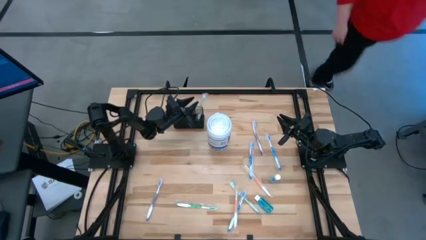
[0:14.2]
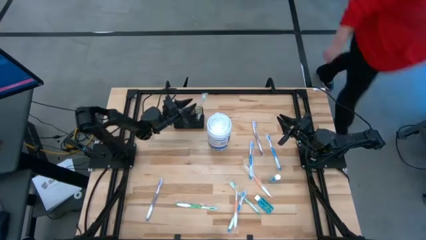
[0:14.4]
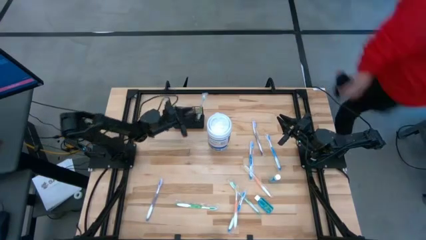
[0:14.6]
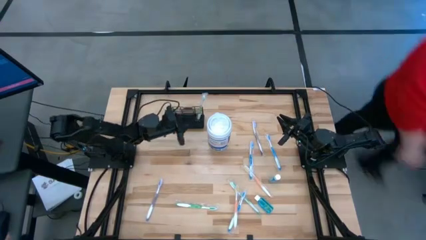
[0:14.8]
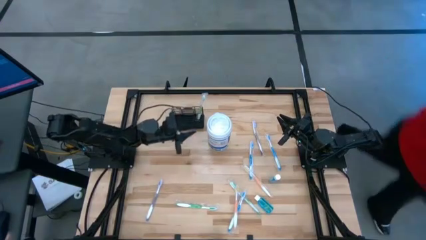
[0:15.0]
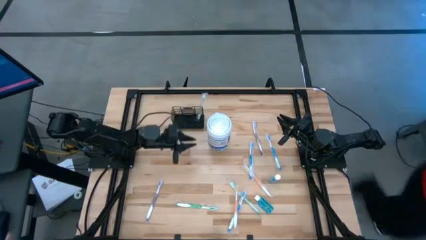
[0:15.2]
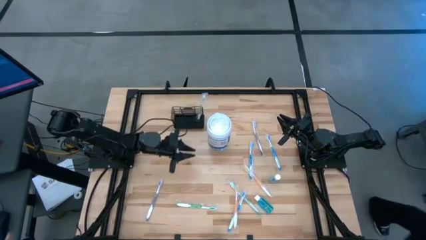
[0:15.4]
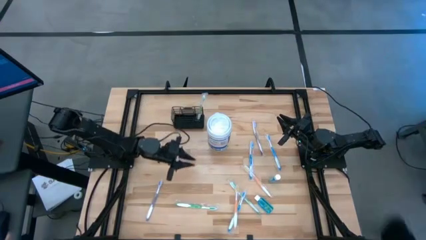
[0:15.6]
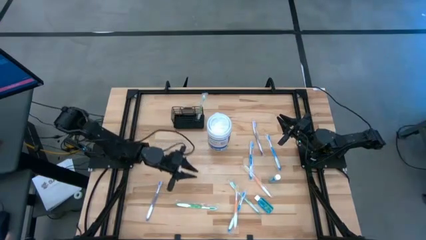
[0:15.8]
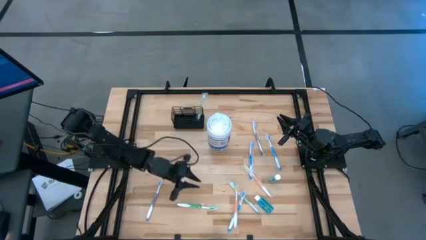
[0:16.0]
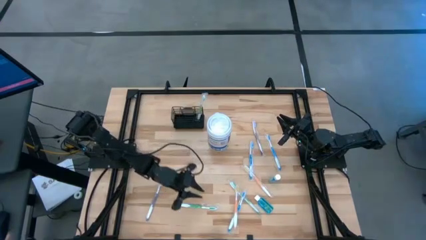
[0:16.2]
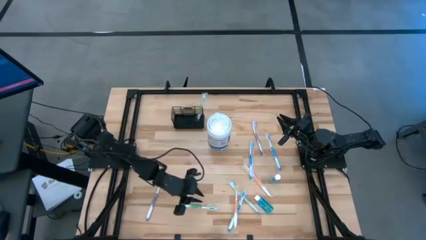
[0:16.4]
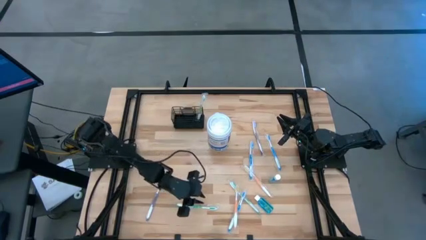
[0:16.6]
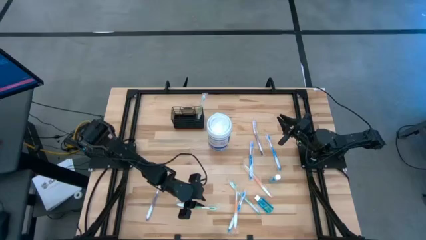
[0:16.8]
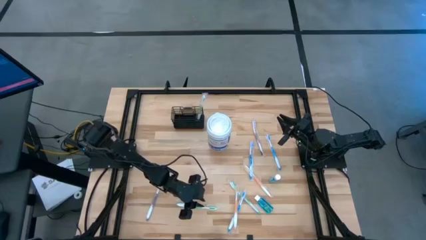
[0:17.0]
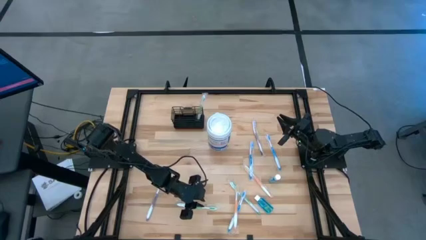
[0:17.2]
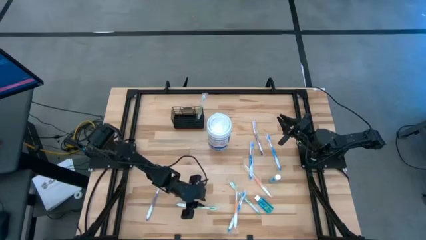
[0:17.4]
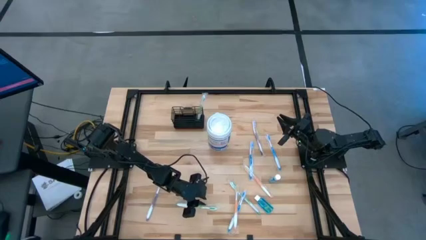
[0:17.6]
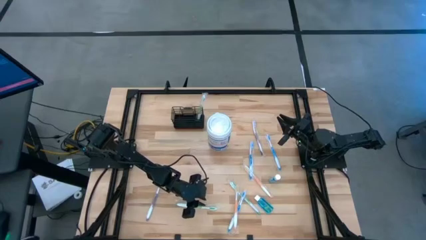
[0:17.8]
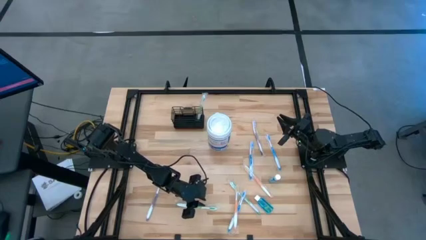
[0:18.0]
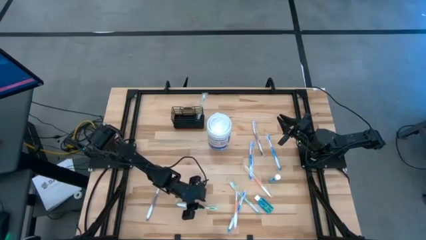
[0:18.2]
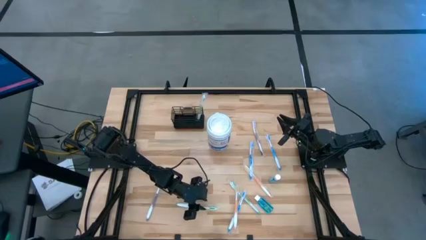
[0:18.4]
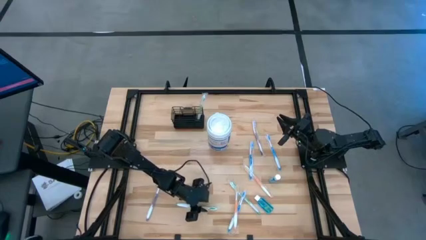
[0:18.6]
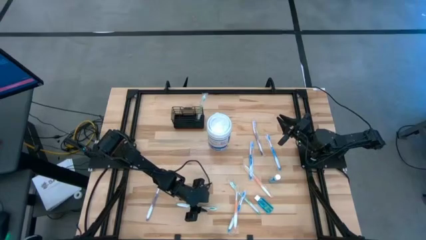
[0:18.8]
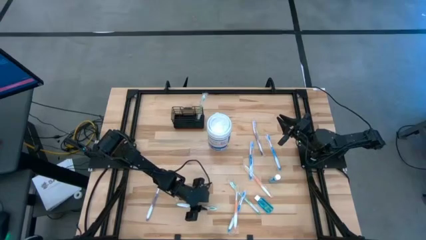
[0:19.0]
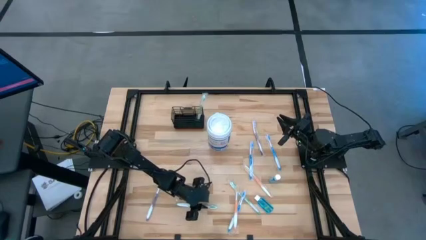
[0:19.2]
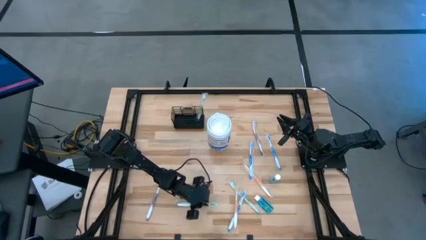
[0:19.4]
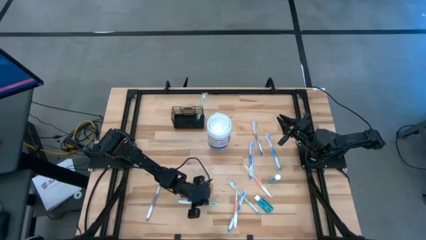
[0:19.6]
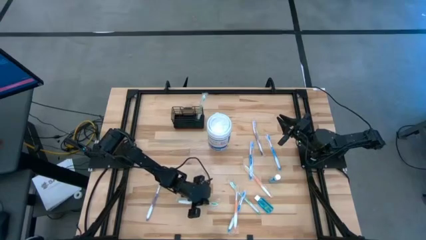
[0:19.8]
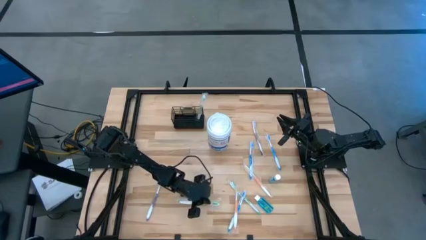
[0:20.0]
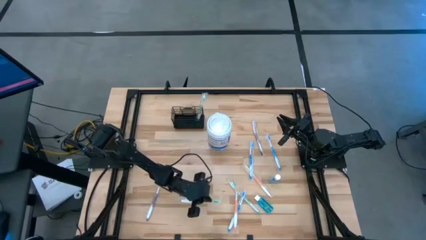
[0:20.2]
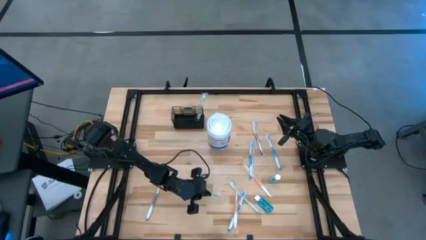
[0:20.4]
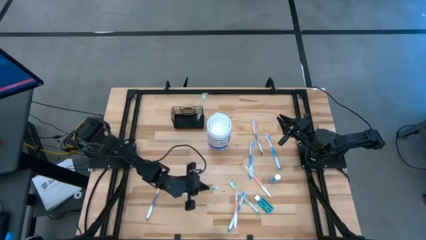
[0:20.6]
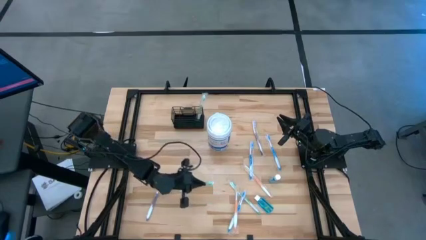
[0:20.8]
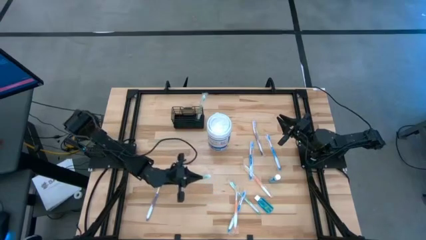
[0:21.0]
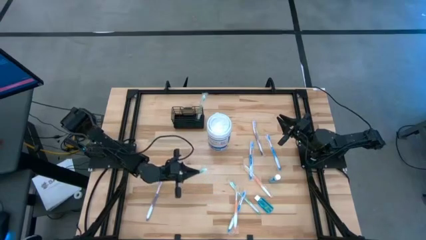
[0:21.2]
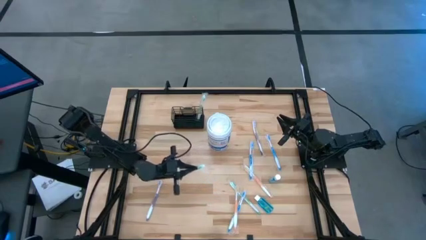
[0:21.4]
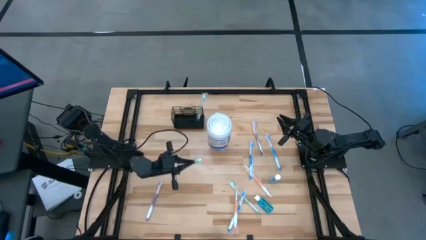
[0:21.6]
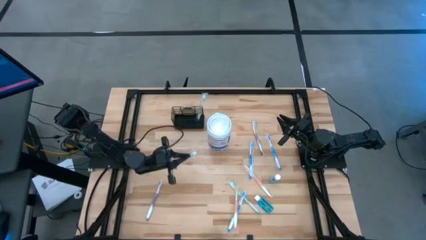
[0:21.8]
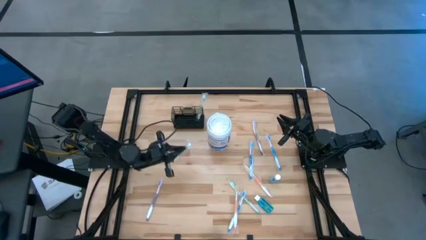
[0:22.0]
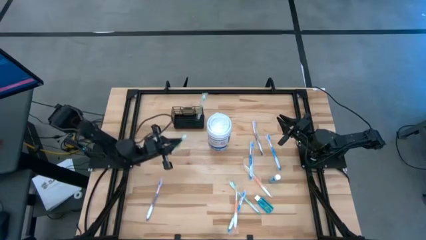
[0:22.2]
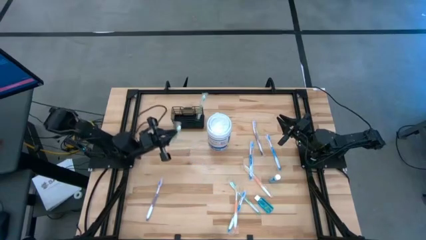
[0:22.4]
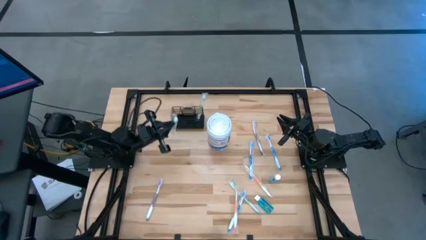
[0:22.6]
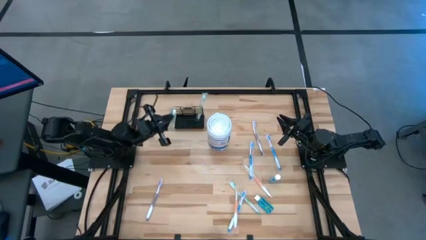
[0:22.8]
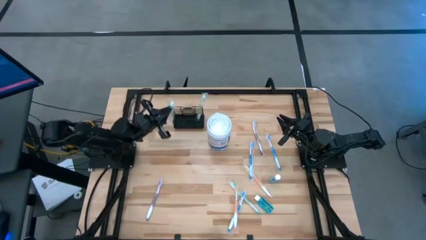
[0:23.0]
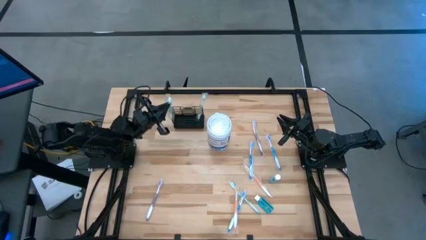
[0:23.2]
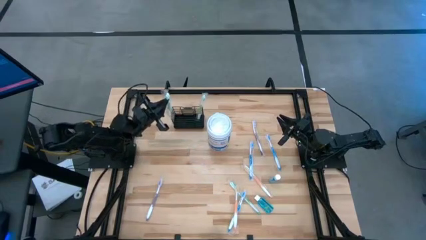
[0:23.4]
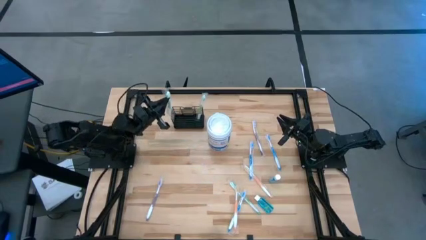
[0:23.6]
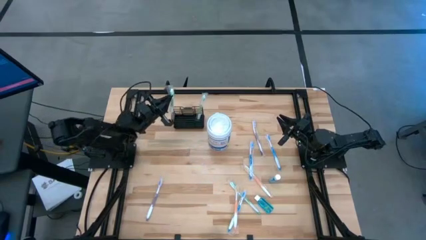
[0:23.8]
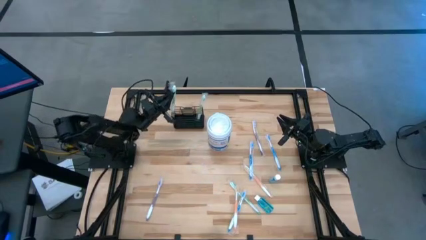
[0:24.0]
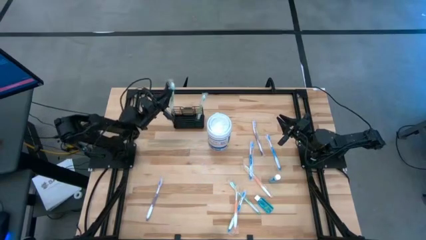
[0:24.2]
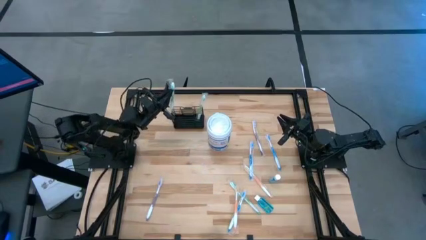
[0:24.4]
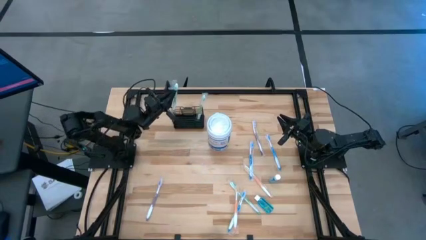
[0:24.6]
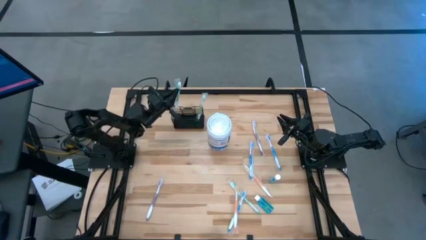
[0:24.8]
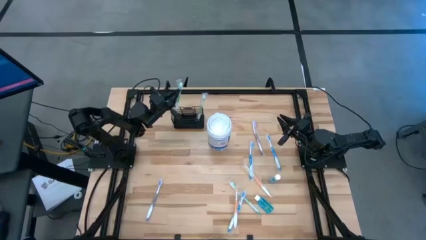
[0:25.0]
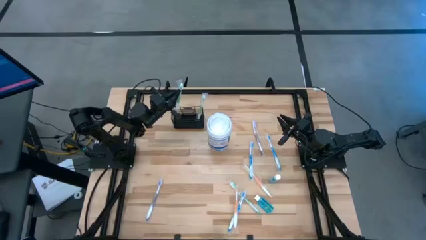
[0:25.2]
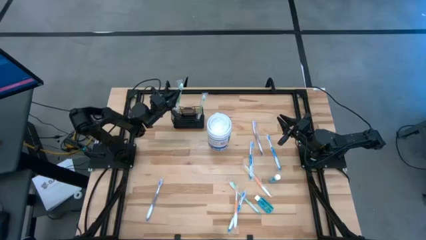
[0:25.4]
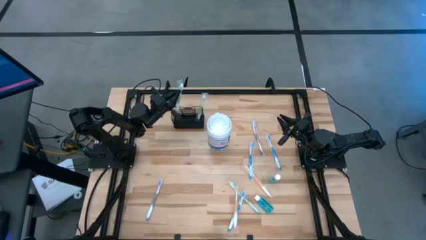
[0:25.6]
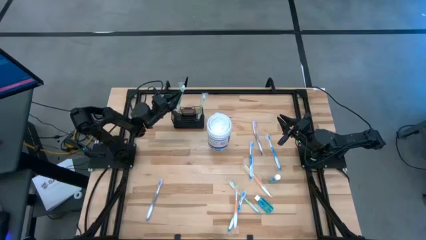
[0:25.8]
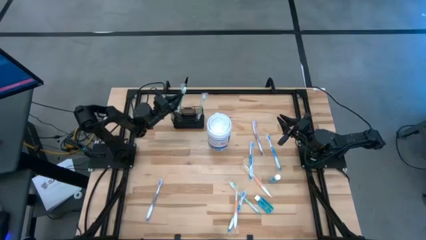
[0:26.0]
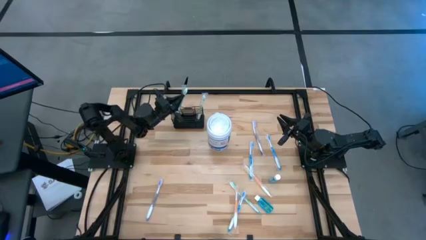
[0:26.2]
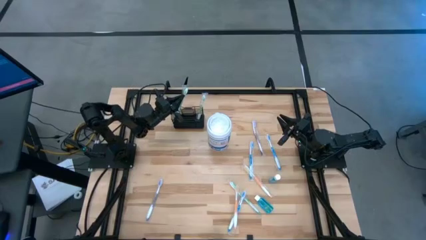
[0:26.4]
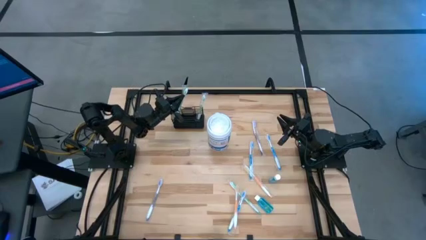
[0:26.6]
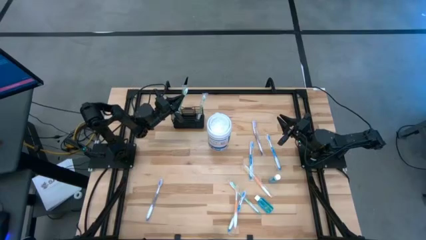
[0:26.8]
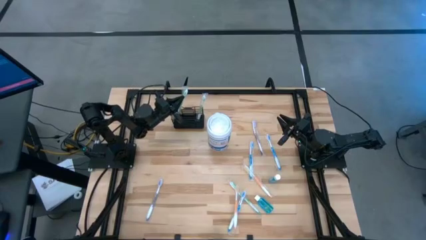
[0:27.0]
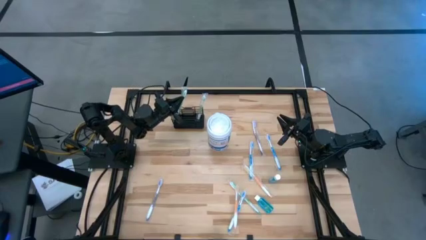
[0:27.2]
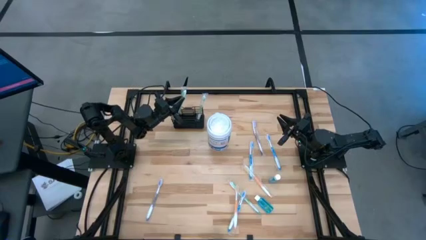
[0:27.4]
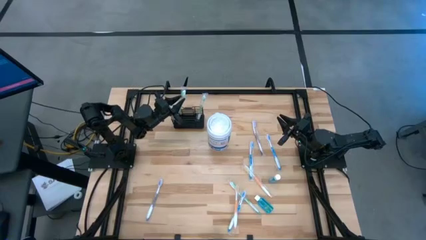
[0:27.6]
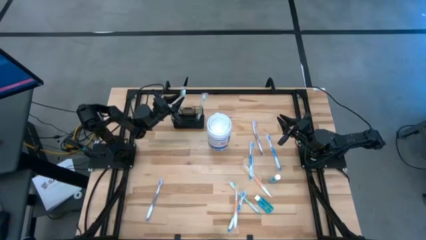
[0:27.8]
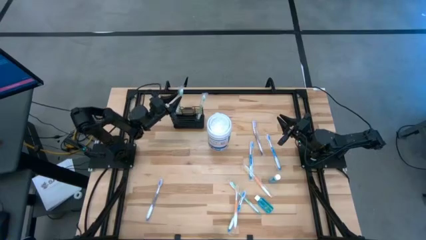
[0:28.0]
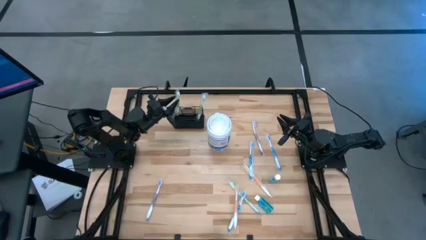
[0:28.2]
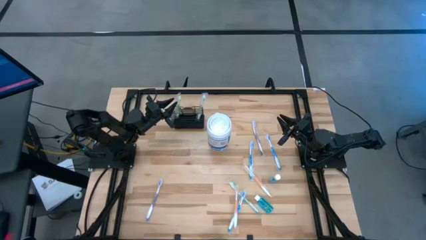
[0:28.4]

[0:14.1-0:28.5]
Task: Pick & Place toothbrushing station
Put the left green toothbrush into the mesh organizer
